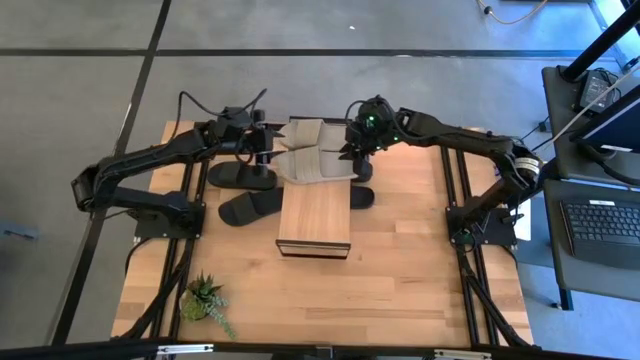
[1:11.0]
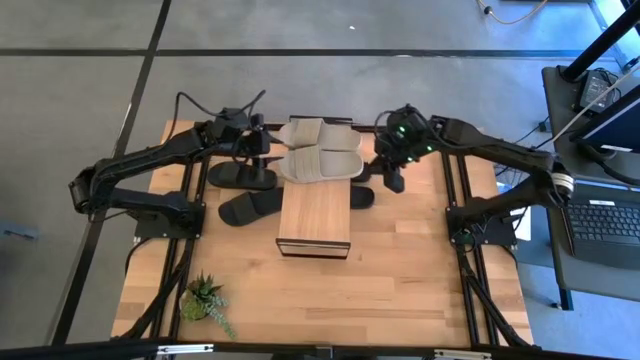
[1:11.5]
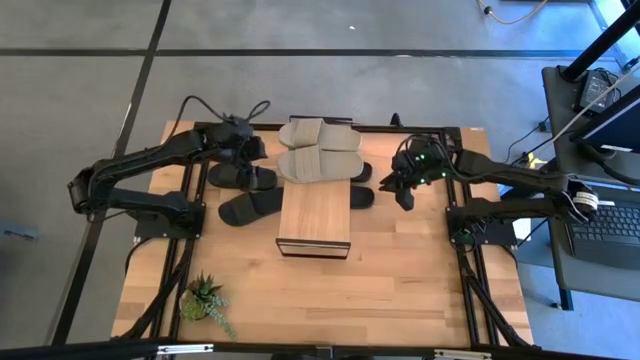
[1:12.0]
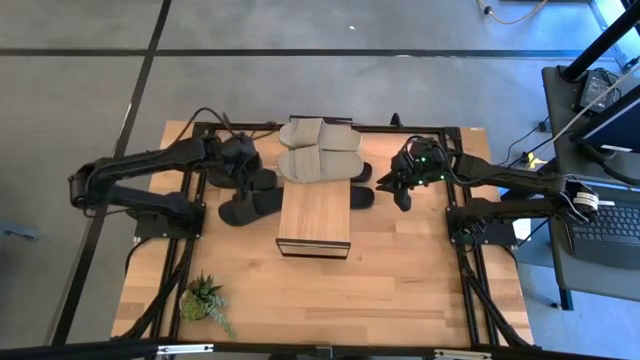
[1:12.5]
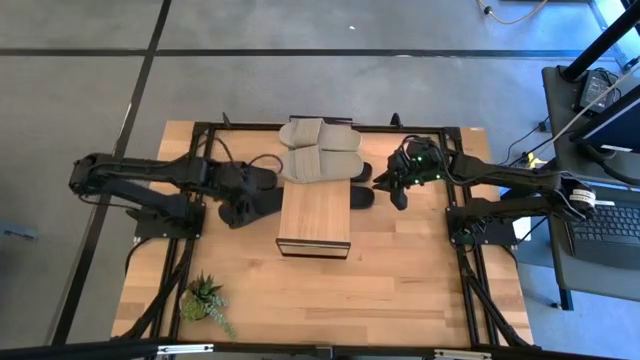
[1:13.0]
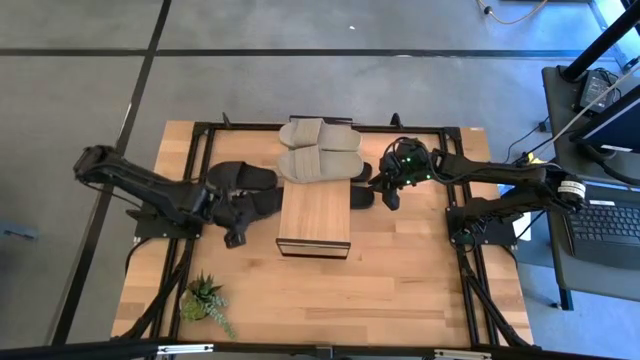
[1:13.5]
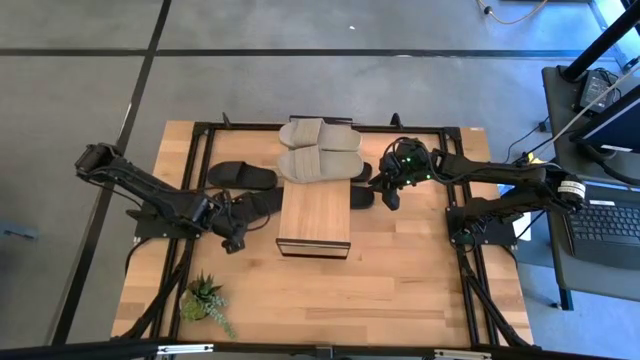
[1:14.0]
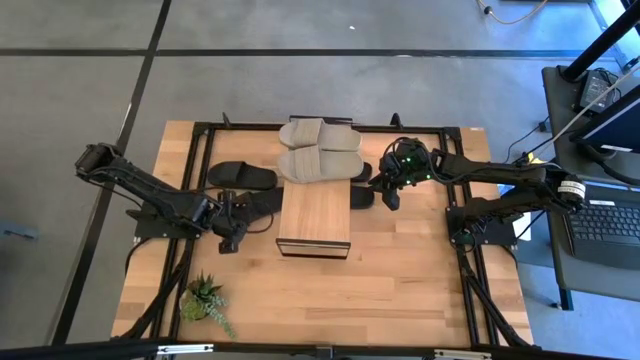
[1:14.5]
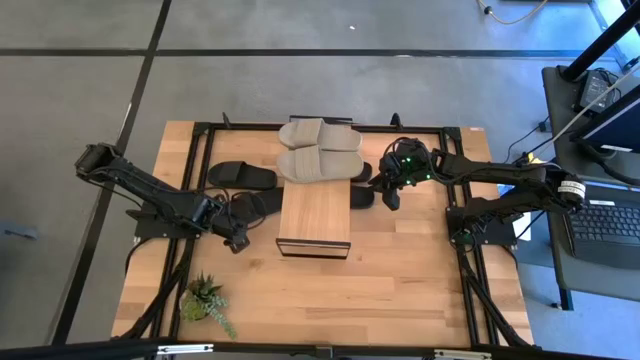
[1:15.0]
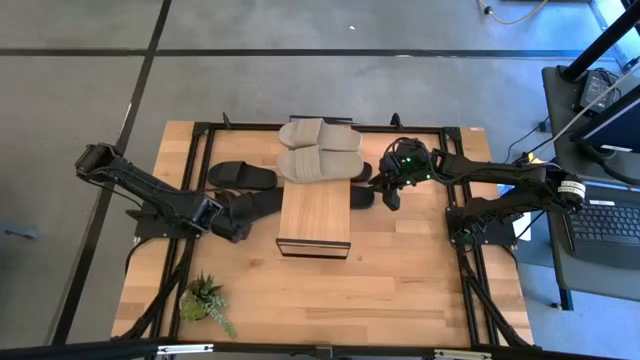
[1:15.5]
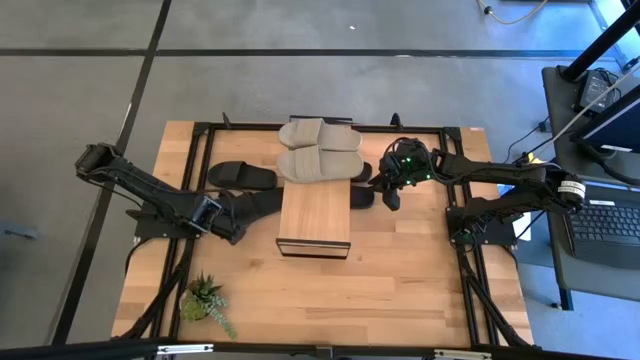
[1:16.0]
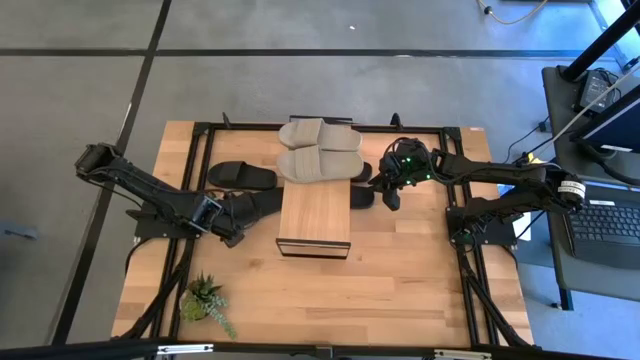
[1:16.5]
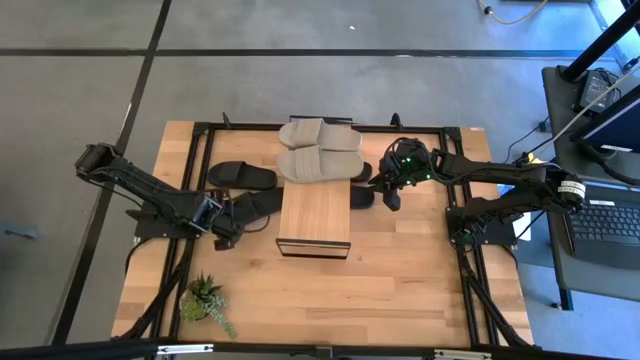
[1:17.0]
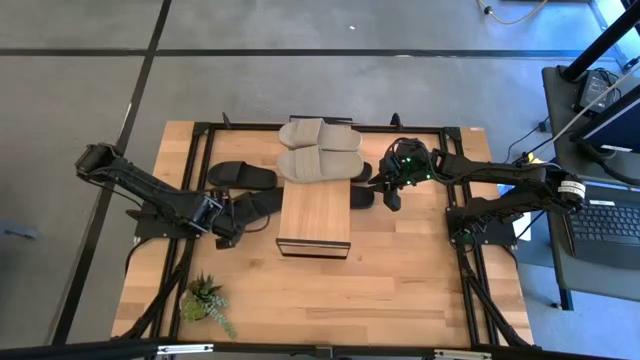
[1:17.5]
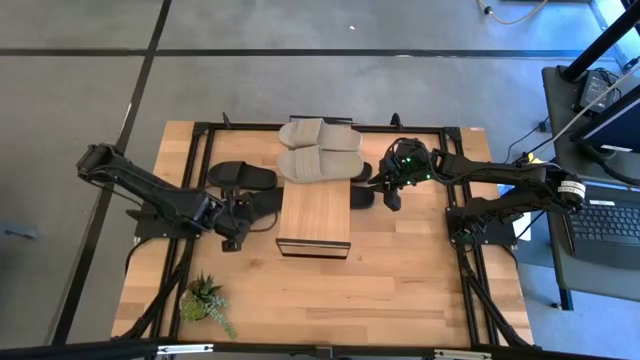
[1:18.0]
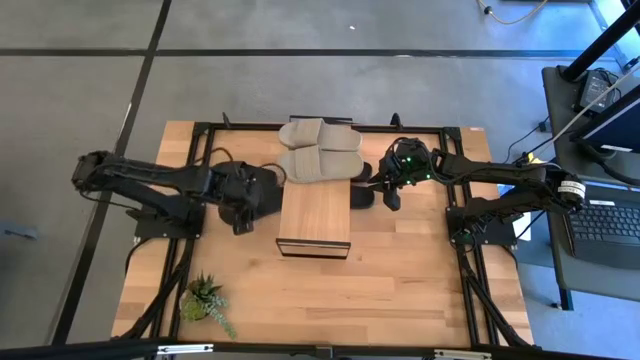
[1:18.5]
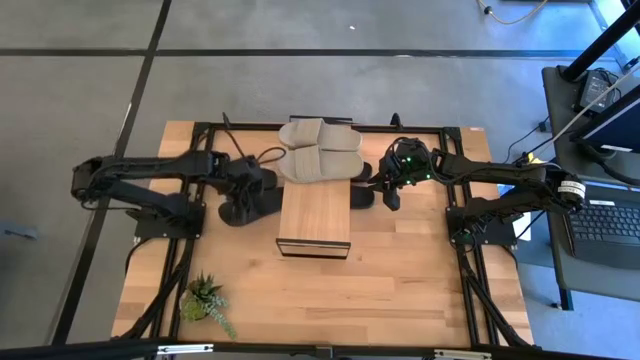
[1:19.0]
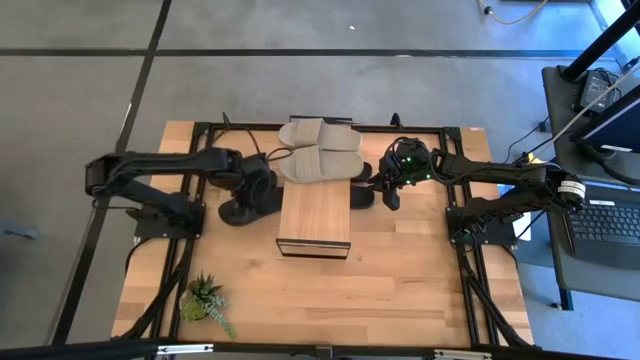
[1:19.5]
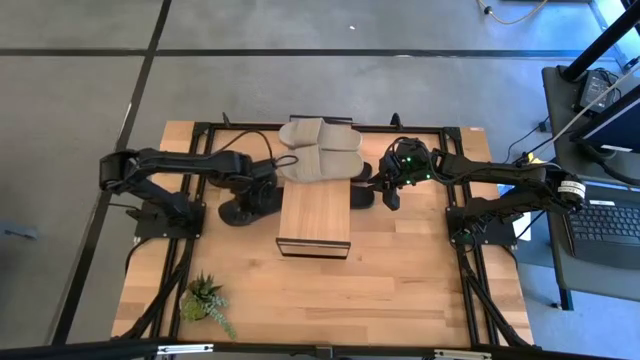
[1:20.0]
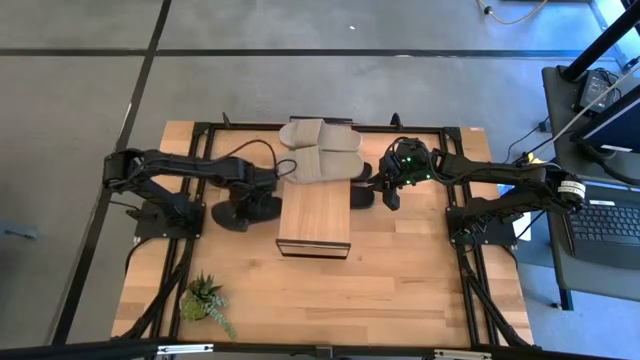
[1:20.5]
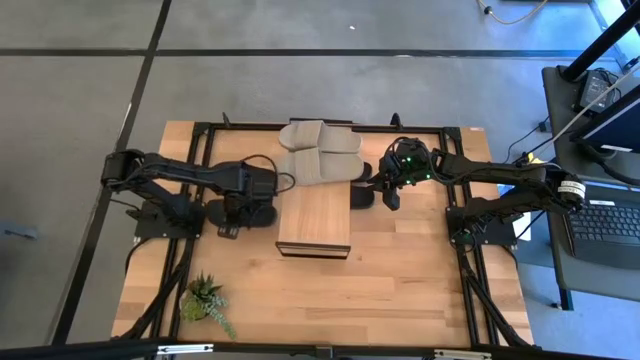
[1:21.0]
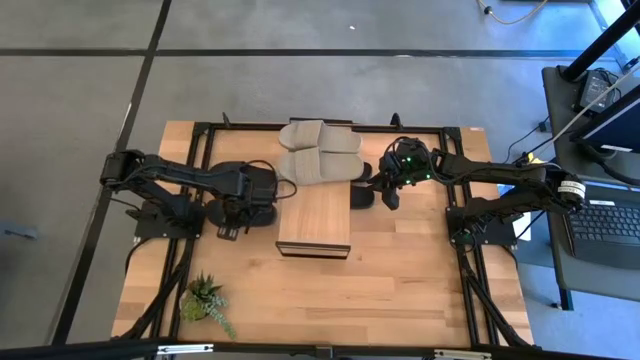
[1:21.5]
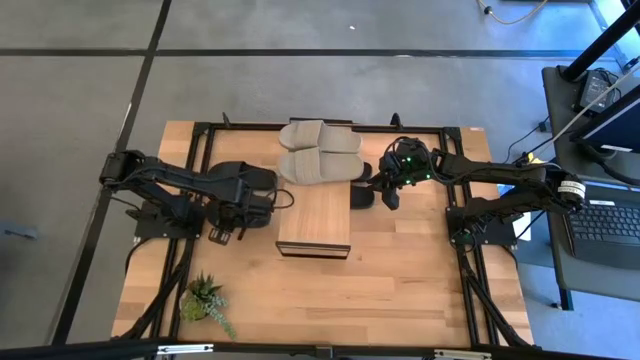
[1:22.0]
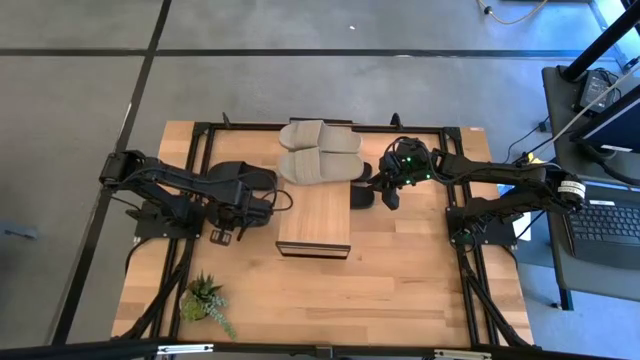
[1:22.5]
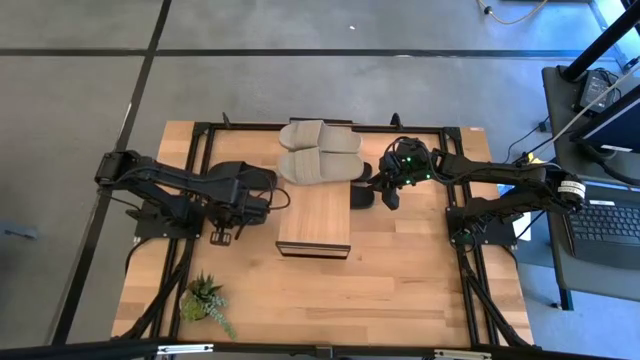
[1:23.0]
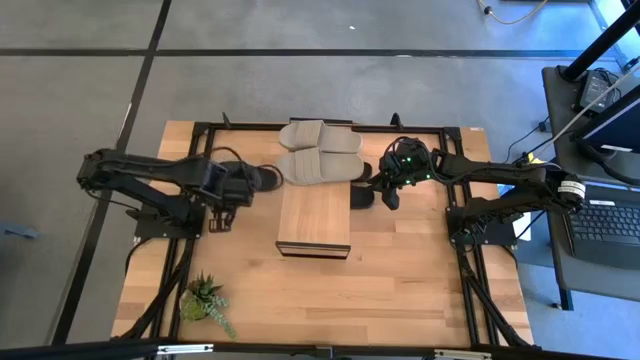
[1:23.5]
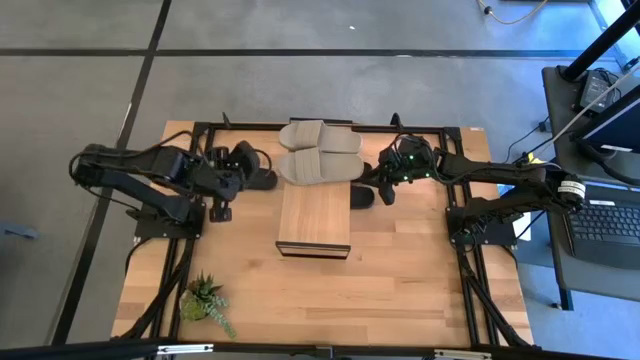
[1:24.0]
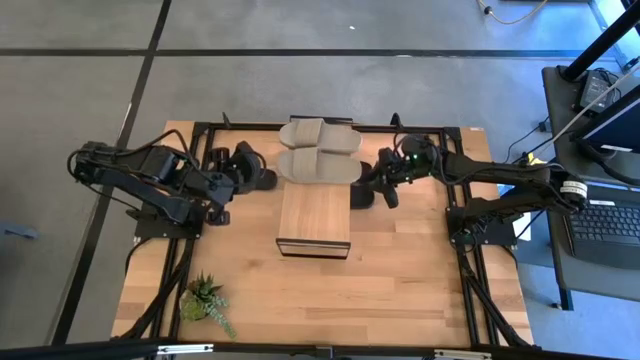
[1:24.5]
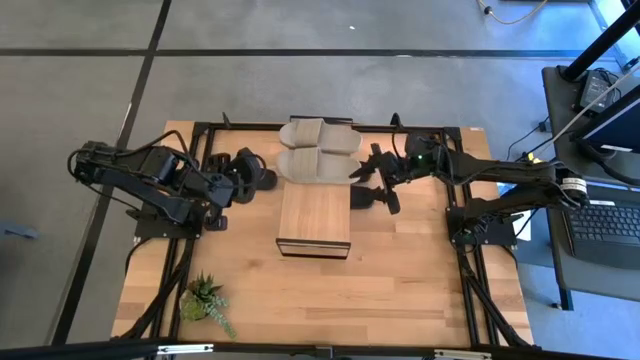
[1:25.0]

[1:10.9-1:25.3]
Task: Pick and place slides into the shelf
Put the bottom left black slide under the shelf

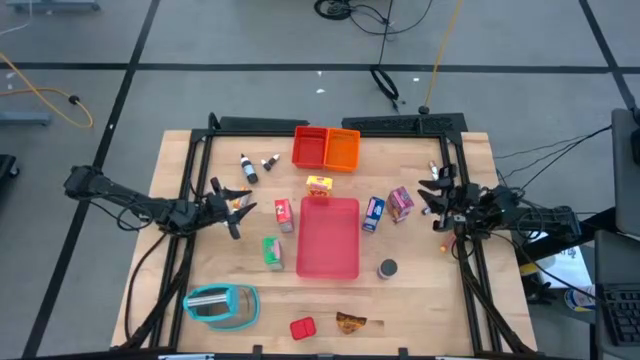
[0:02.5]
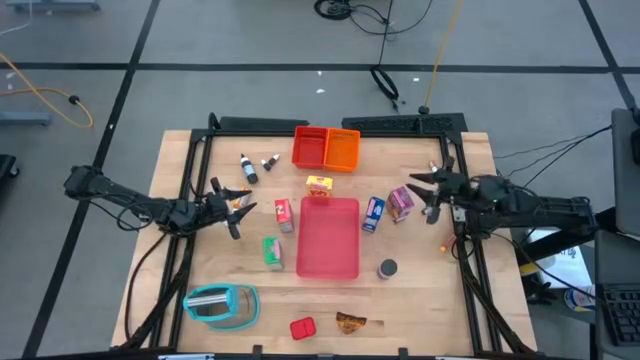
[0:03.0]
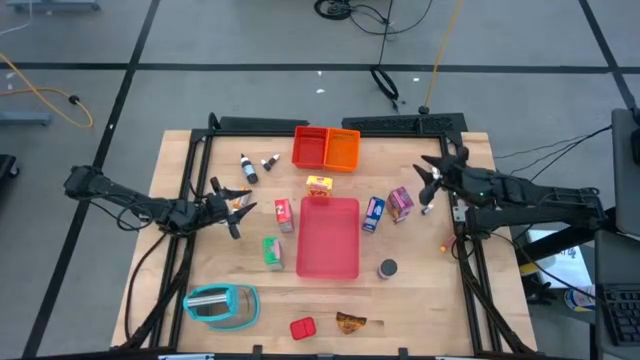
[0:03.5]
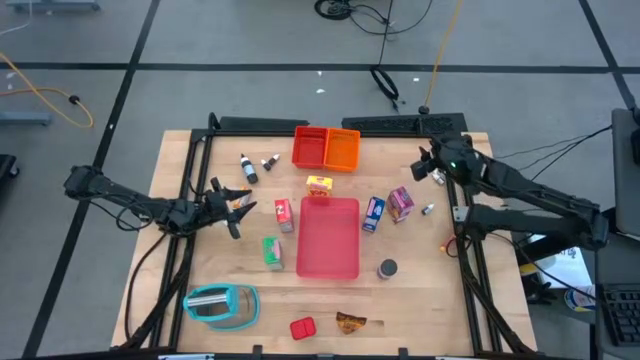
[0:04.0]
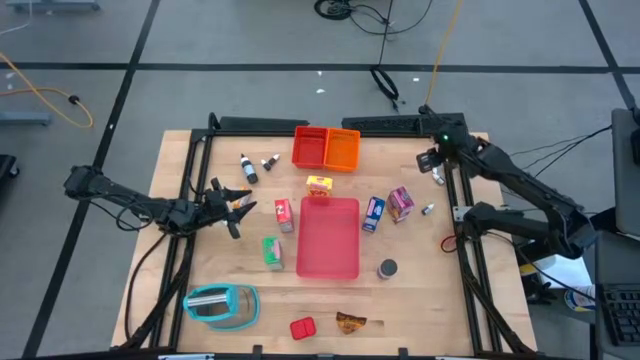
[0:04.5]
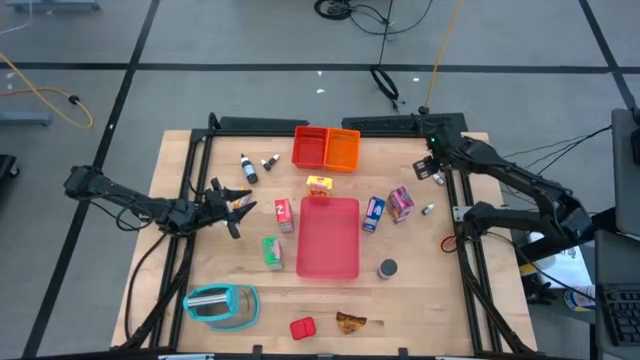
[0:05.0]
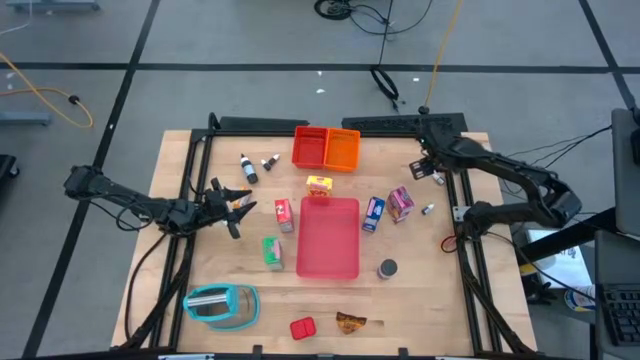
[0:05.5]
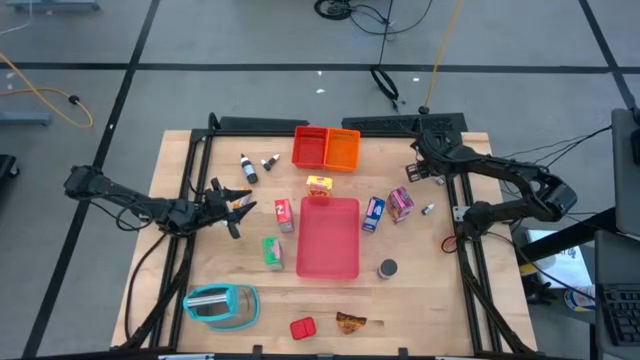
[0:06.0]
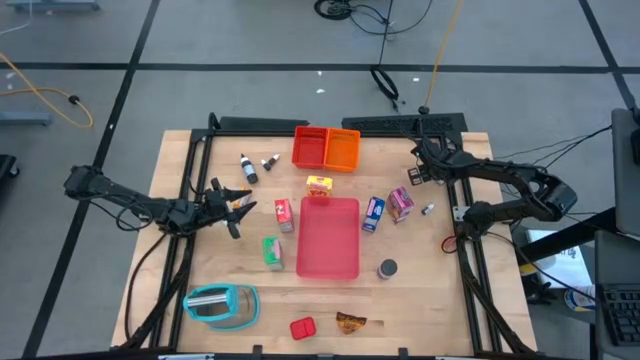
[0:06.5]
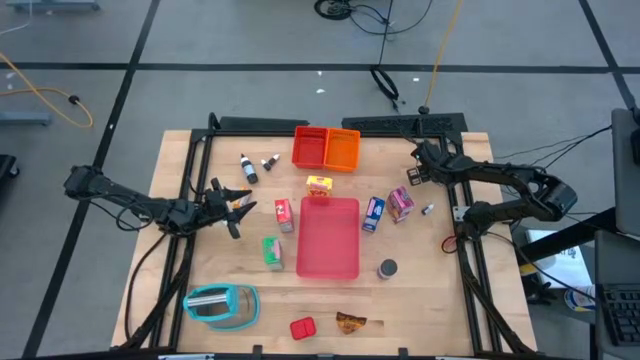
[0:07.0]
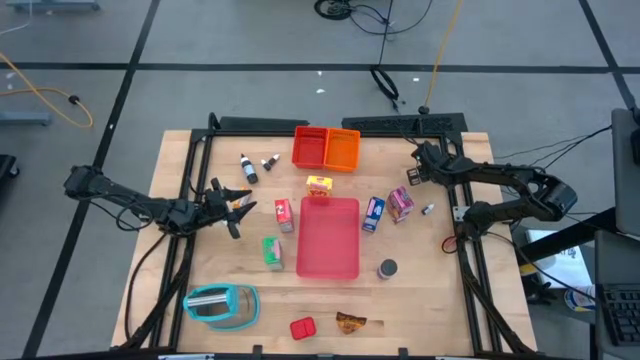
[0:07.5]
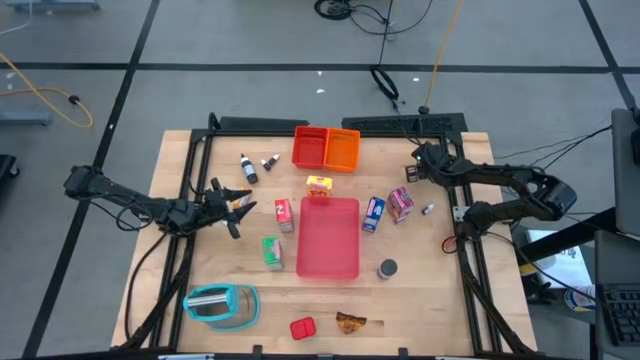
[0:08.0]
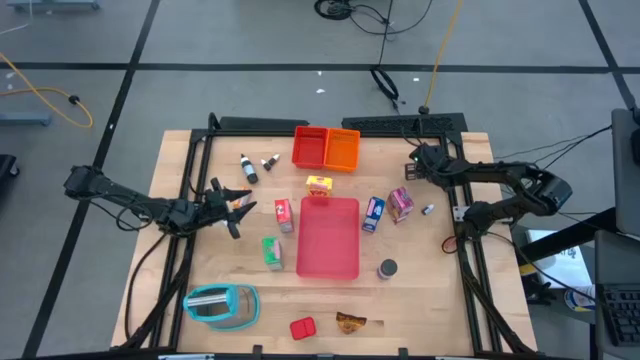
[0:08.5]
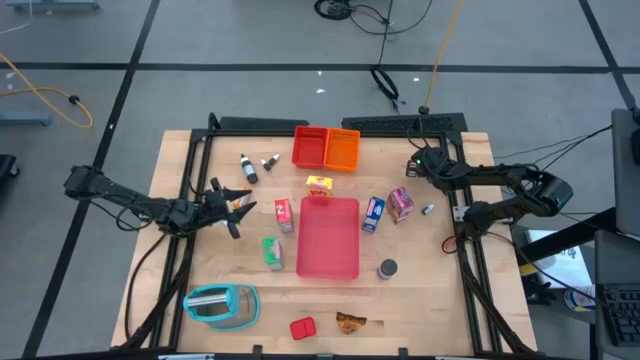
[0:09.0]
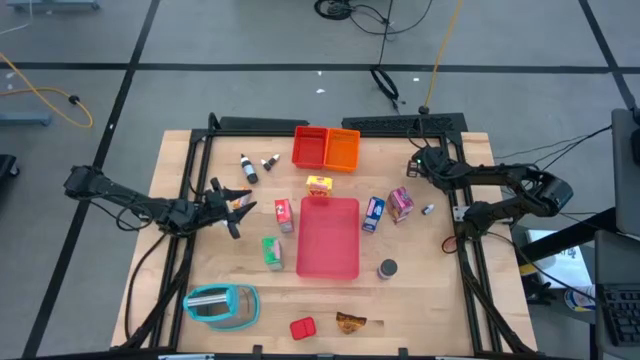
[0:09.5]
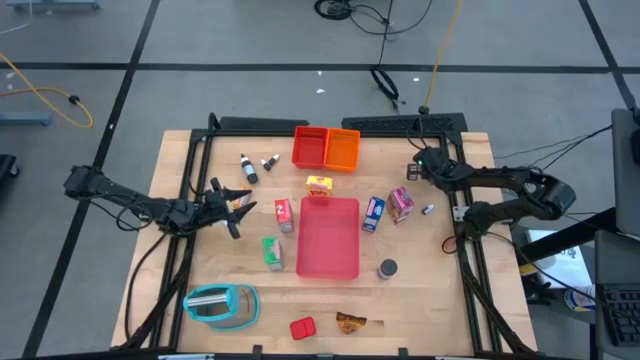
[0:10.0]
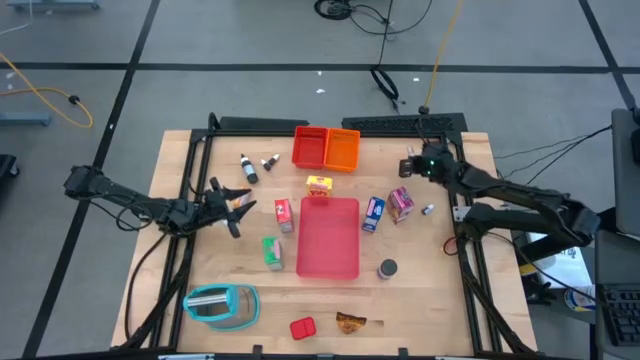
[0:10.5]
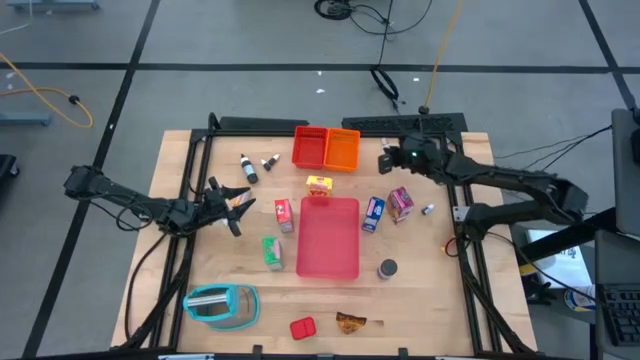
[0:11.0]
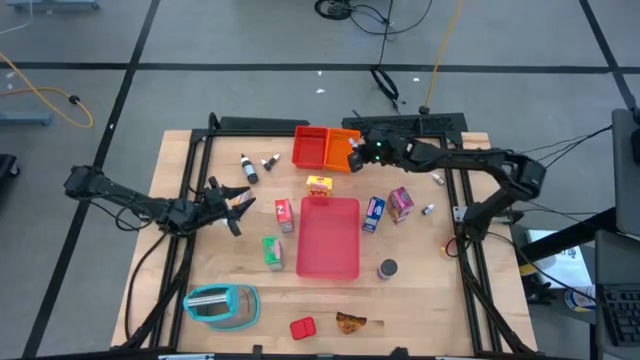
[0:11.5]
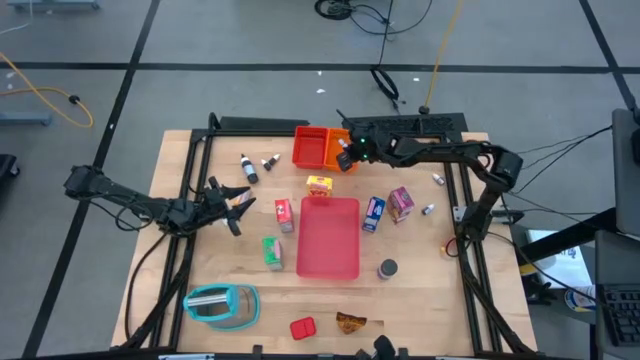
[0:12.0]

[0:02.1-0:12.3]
Task: Pick & Place Kitchen Items
Put the small orange food coloring bottle into the orange basket
